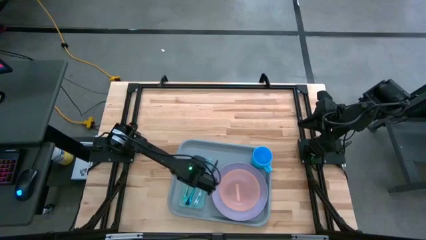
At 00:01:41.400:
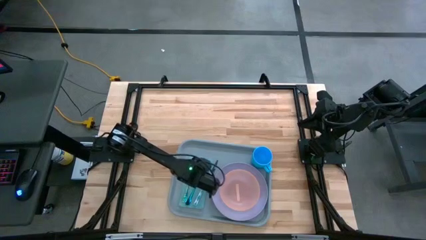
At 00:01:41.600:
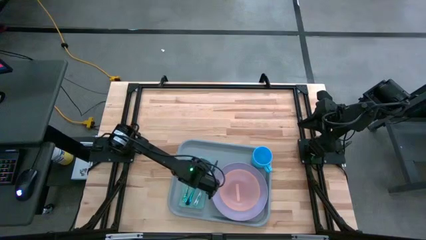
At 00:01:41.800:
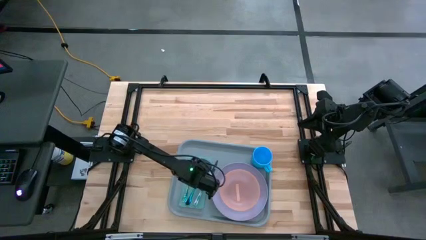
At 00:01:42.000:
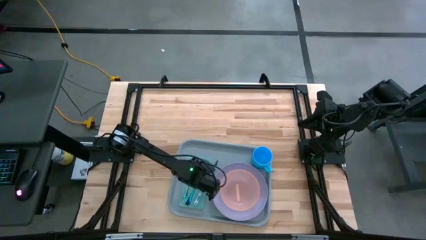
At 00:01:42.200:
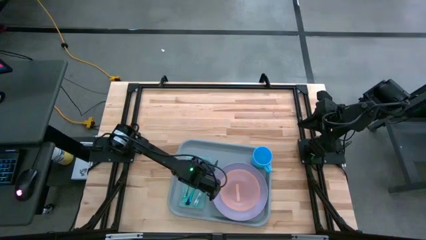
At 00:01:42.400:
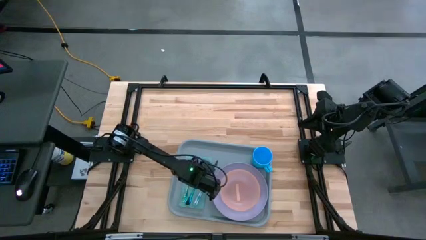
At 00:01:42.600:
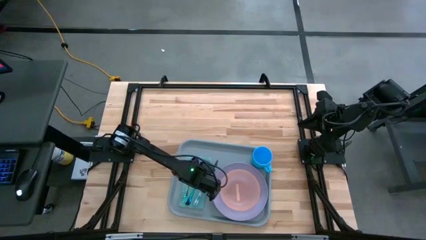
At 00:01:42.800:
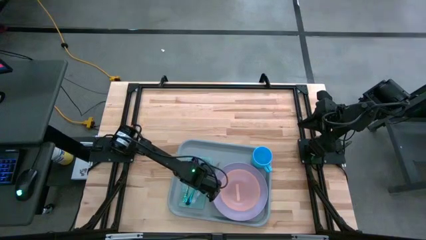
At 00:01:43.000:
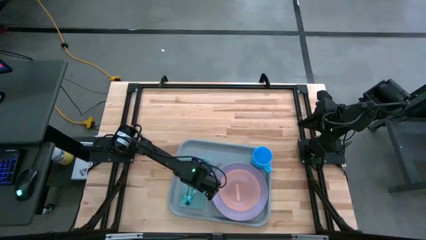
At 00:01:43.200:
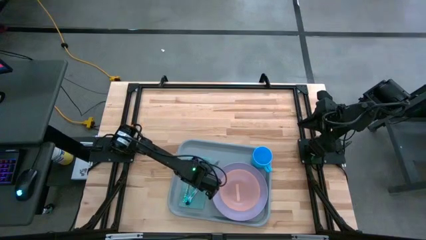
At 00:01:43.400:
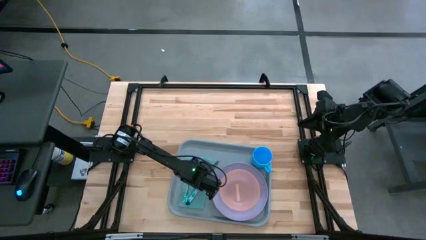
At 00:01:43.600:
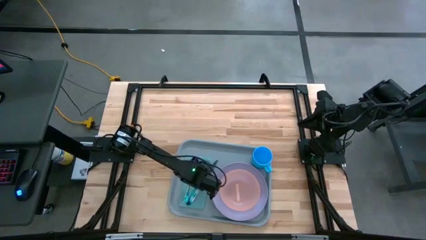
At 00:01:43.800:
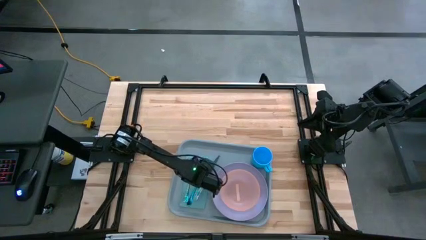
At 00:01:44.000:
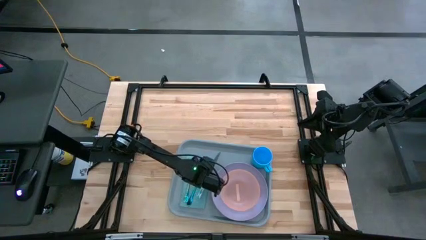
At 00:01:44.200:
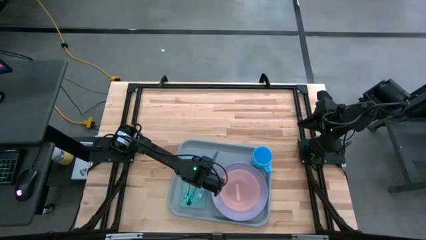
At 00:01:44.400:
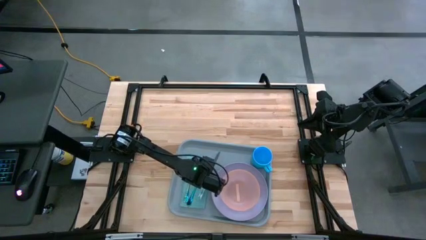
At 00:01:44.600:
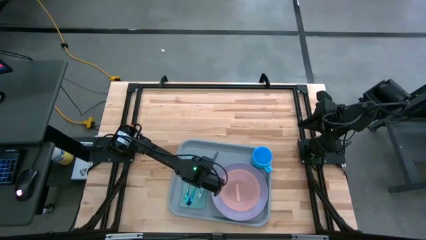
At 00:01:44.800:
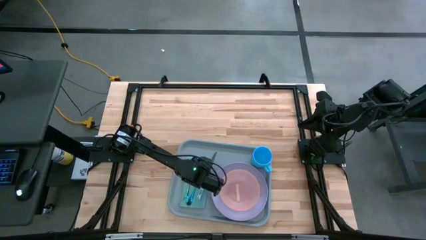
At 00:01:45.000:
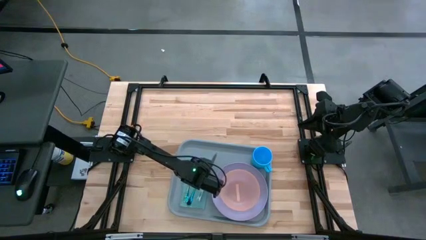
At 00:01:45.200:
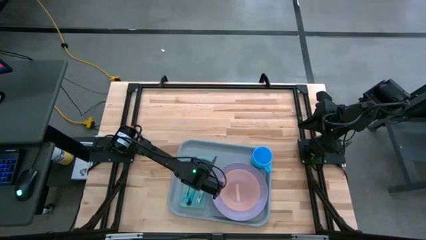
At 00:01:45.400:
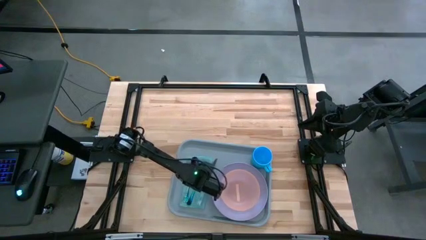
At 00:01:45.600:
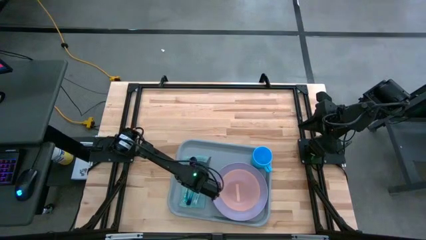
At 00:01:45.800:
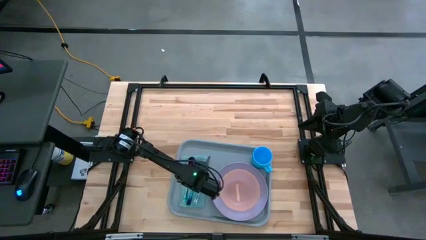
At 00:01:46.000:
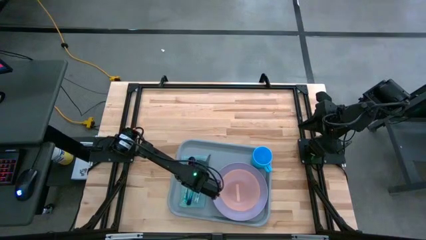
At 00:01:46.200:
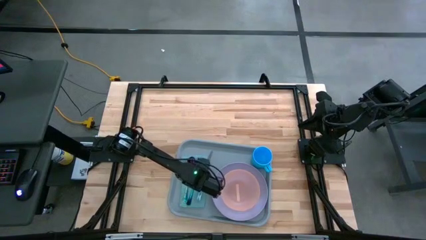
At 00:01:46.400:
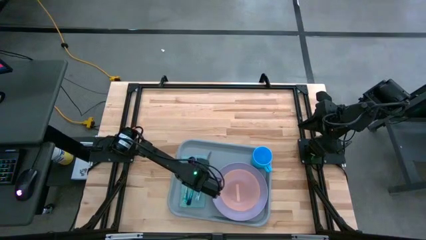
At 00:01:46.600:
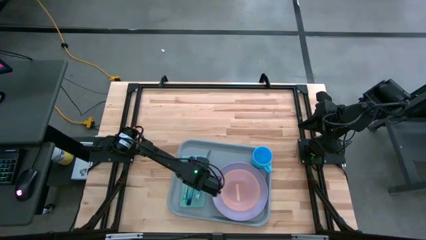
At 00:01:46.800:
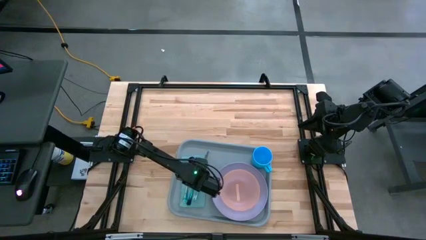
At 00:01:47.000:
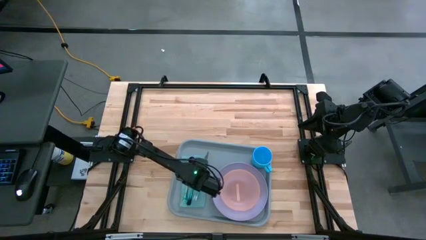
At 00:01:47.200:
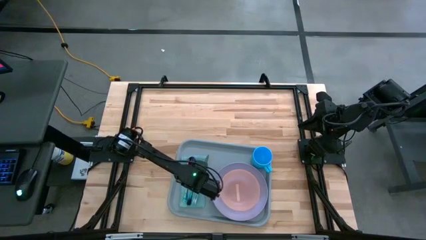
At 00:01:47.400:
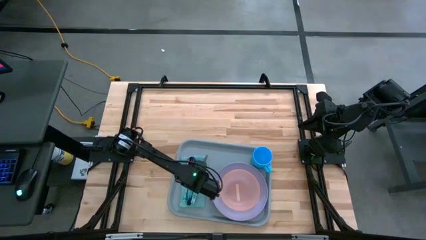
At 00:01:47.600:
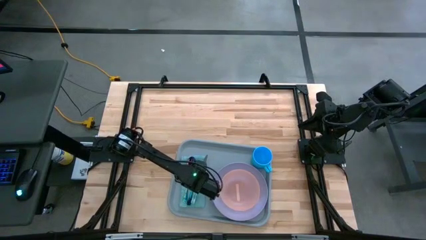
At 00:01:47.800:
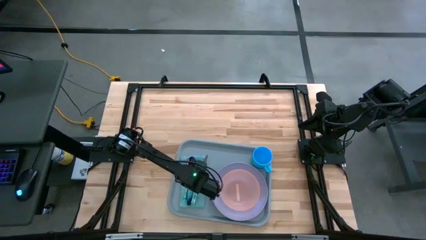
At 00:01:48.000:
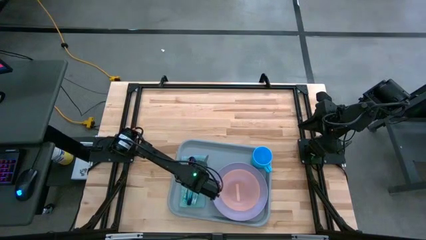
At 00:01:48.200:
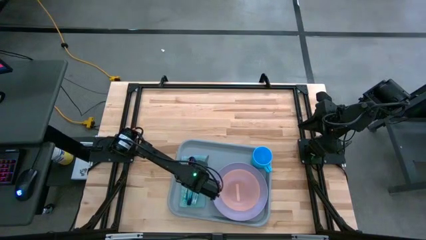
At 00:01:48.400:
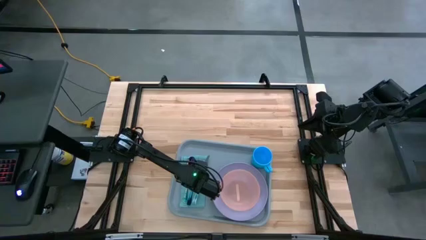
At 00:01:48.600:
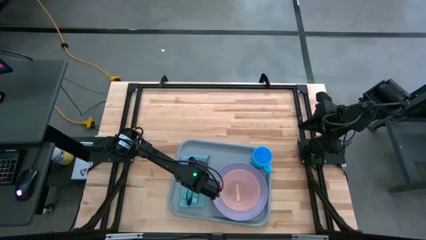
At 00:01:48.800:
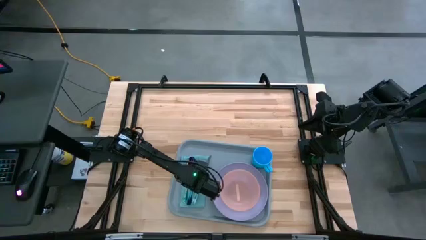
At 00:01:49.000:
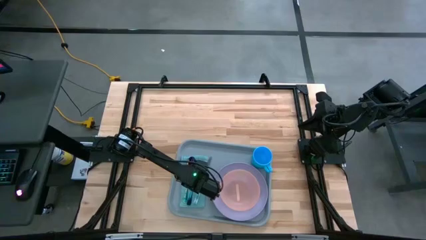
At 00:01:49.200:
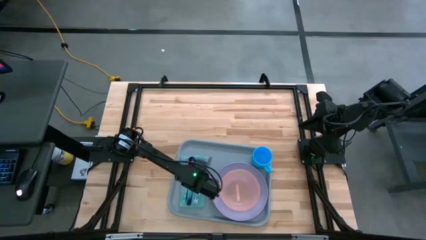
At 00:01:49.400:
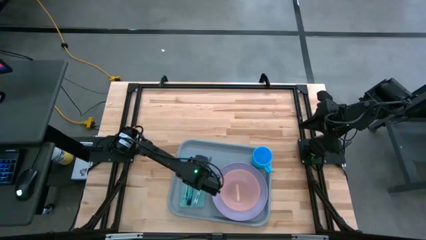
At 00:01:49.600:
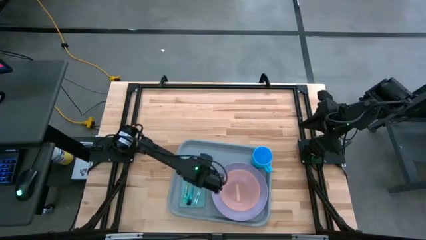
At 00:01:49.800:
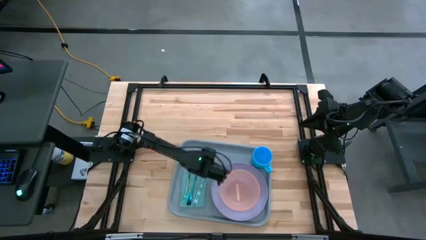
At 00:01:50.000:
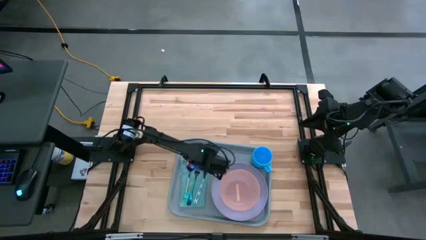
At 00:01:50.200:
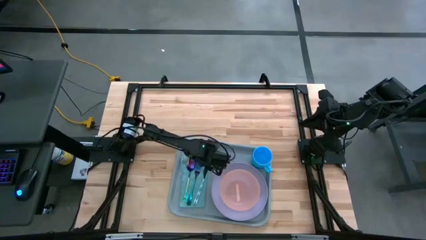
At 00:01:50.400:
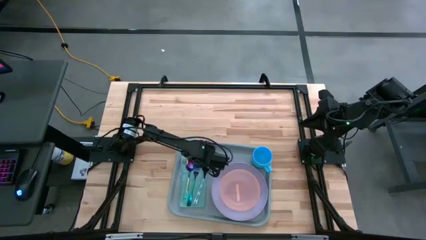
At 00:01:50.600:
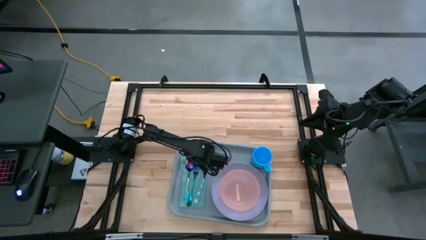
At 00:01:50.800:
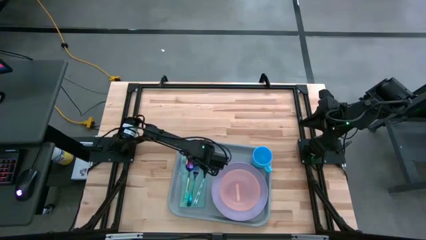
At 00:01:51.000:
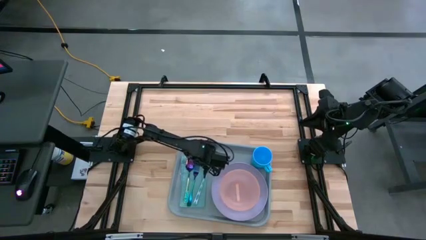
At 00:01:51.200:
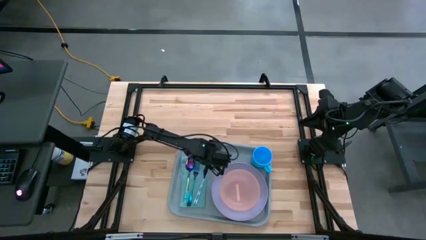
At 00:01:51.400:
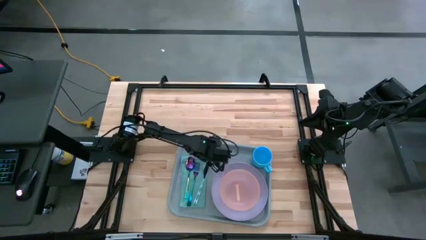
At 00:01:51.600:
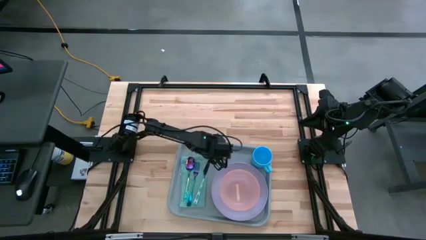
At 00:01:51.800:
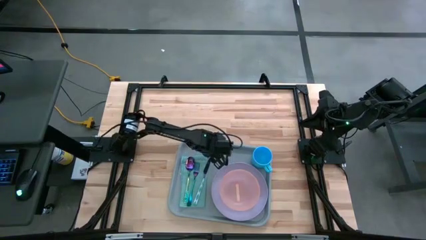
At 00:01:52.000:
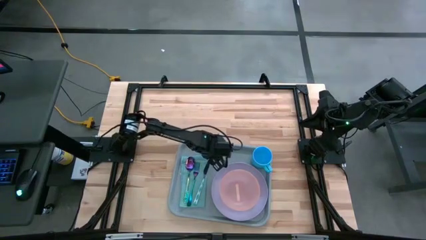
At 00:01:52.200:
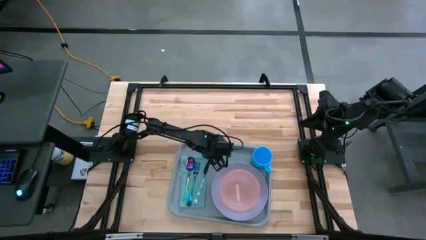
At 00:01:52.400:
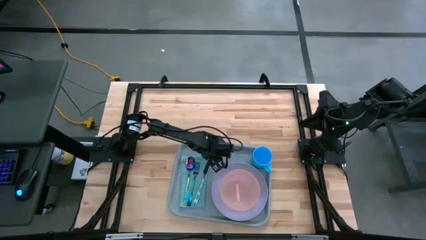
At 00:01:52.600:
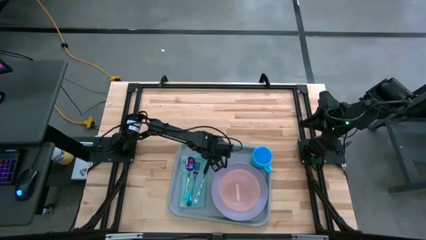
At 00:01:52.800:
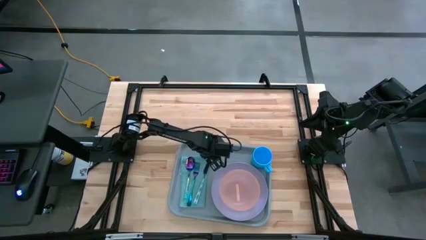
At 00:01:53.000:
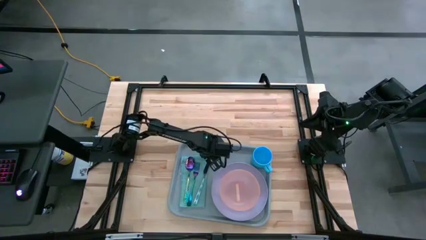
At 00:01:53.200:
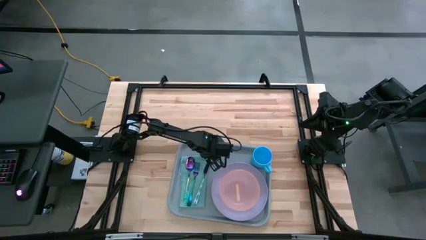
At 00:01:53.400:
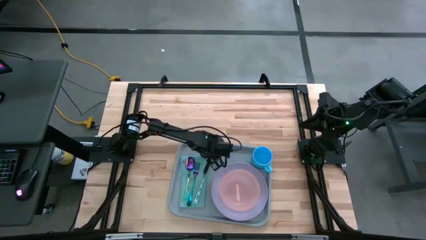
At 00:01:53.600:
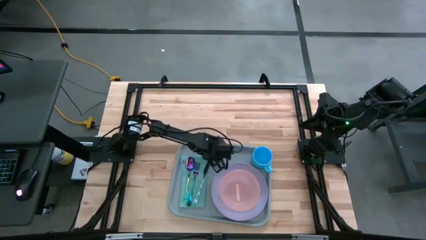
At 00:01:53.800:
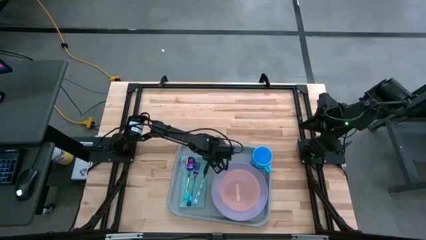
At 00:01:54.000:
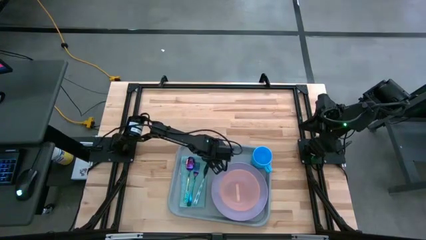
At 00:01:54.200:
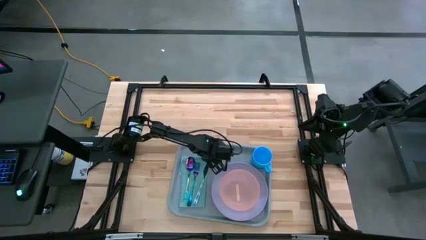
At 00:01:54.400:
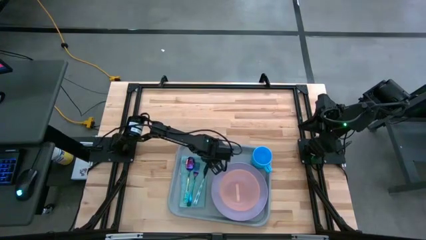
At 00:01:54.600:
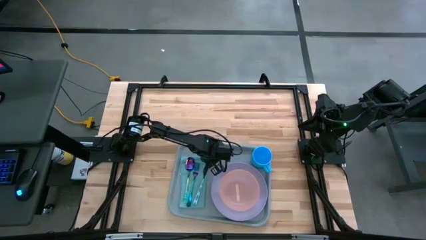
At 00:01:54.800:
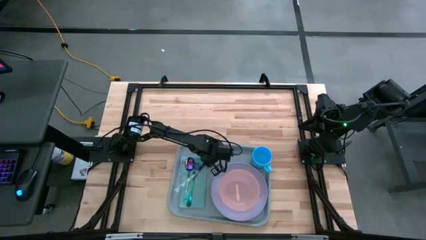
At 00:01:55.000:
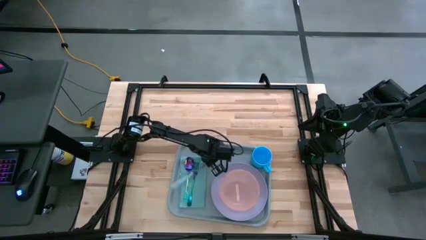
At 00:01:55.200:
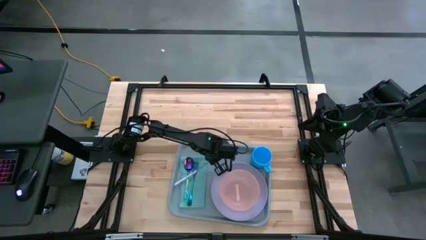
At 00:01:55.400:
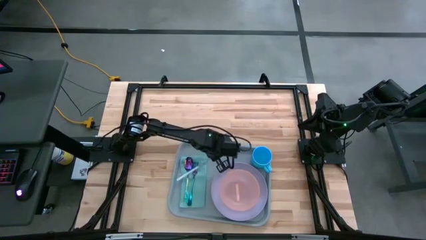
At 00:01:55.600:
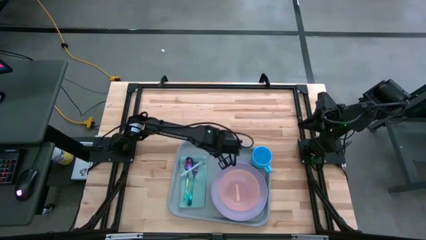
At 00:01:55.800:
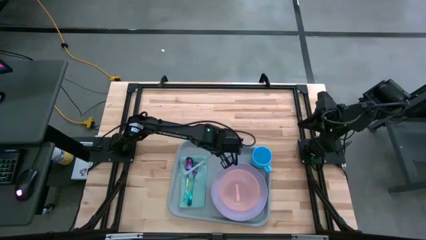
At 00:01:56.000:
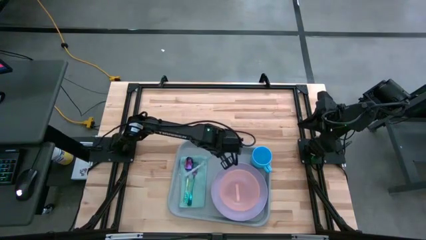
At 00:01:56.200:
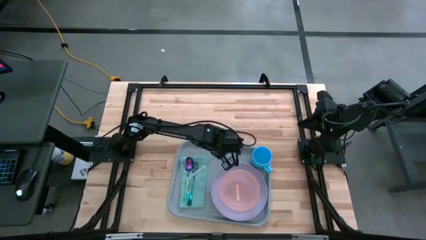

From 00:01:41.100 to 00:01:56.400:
Task: Set up tray
Adjust the green knife on the blue napkin
